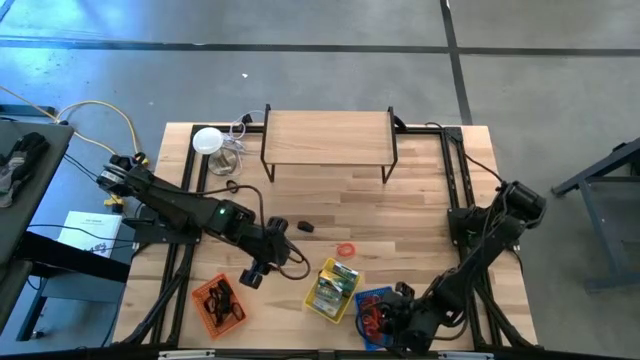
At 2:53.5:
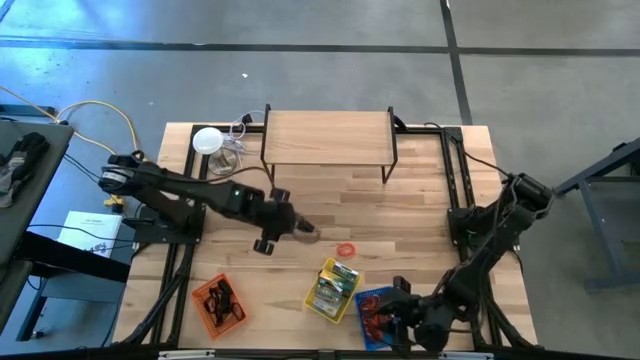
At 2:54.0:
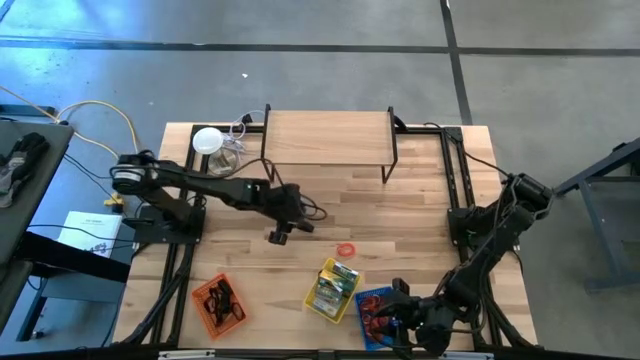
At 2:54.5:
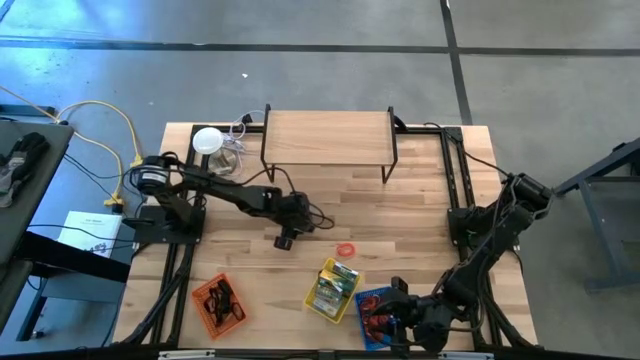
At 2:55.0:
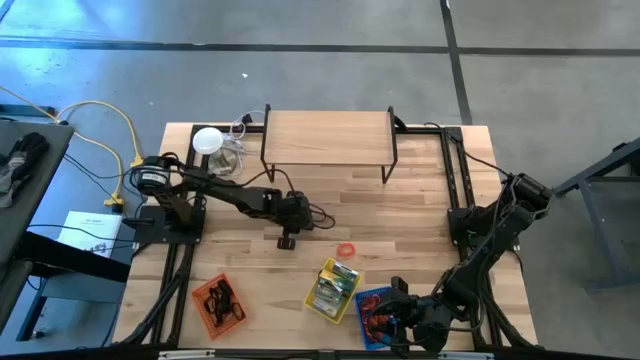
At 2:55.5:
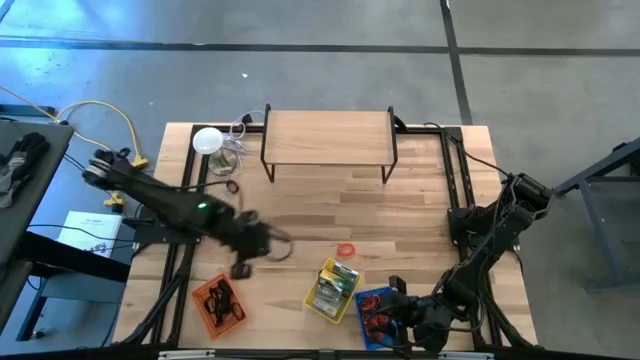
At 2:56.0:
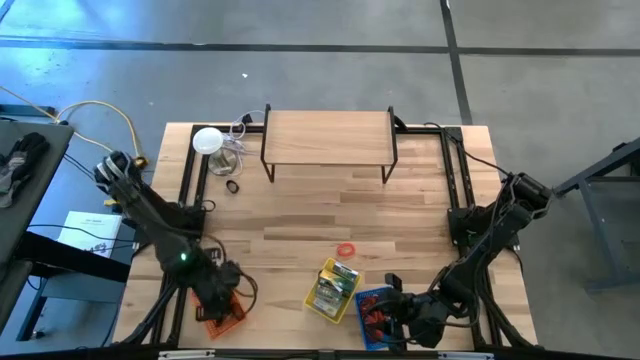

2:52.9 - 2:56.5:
Task: Pick & Place Office Desk Supplies
Put the bottom black rubber band into the orange bin

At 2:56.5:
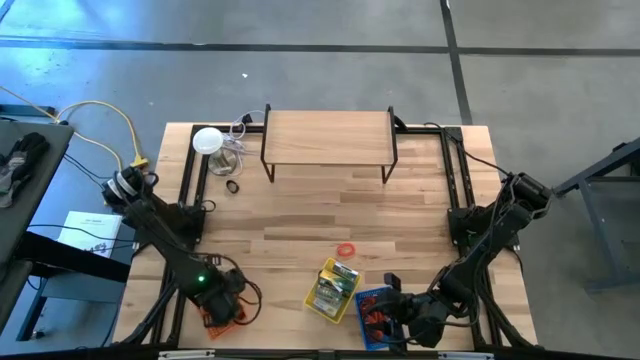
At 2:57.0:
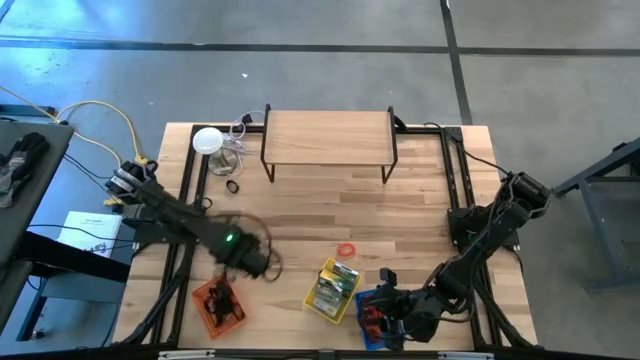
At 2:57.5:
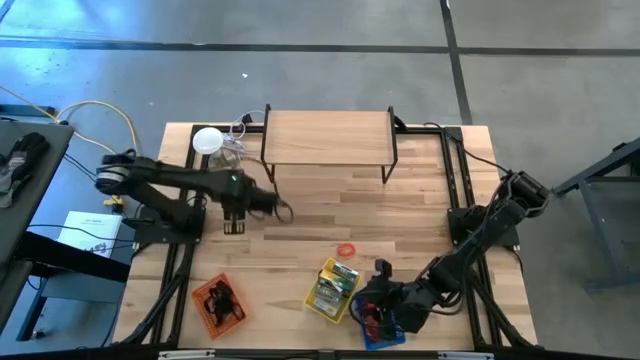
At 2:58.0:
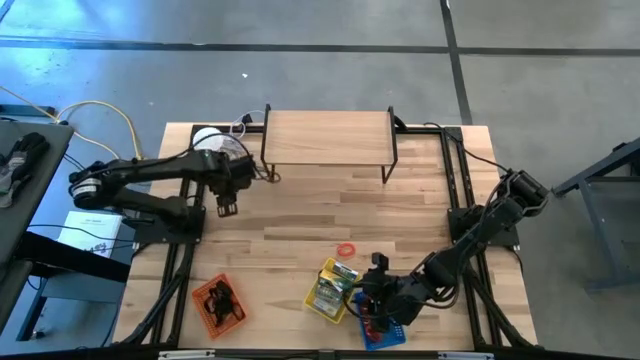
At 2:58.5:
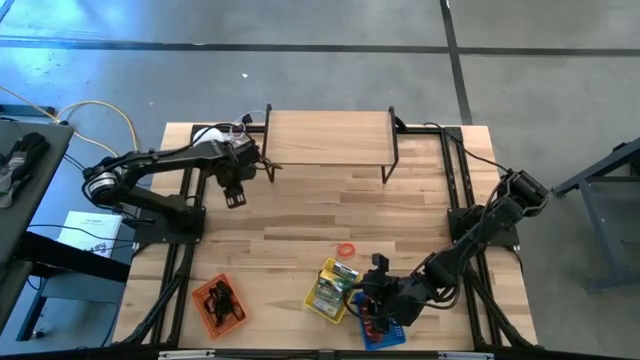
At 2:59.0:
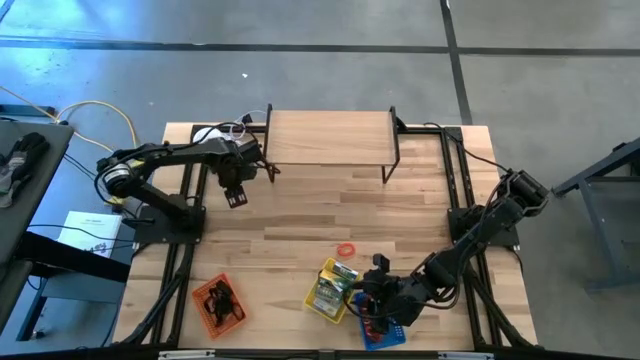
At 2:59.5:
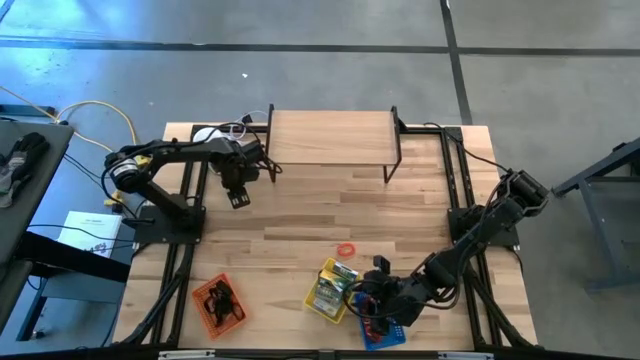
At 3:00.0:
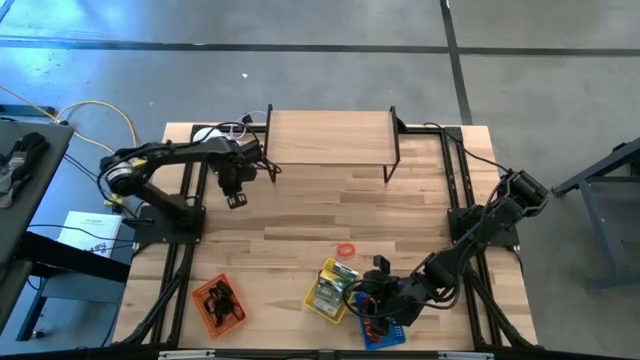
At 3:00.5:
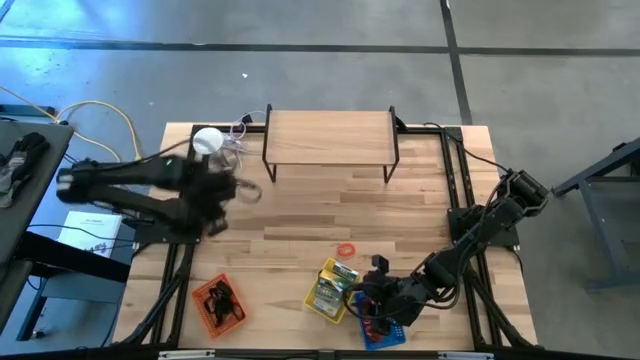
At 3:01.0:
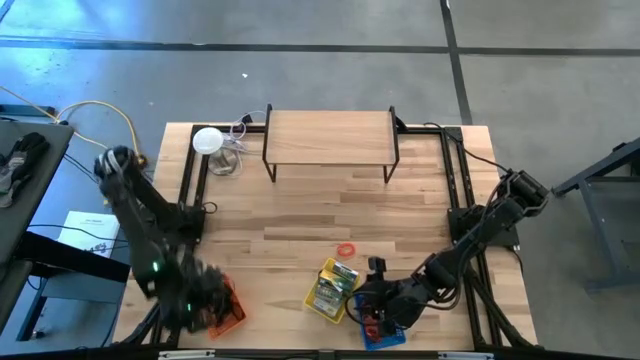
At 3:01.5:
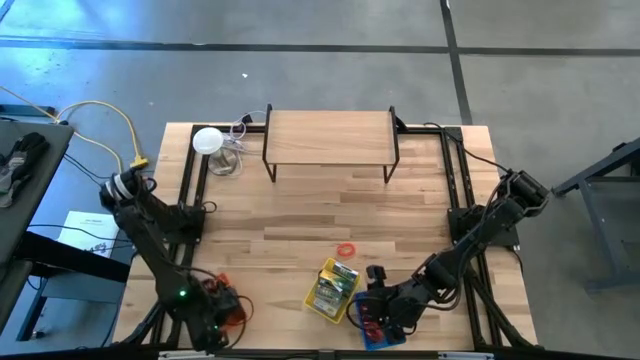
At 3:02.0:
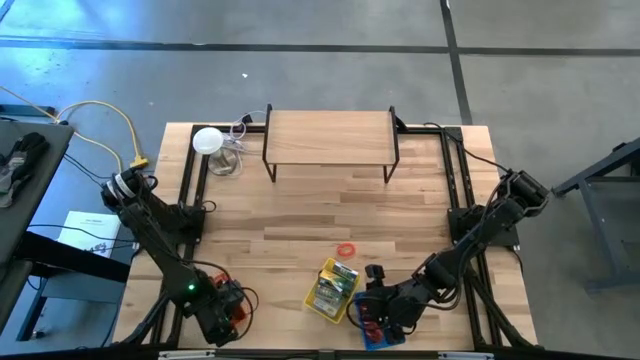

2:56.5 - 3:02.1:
Put the black rubber band into the orange bin

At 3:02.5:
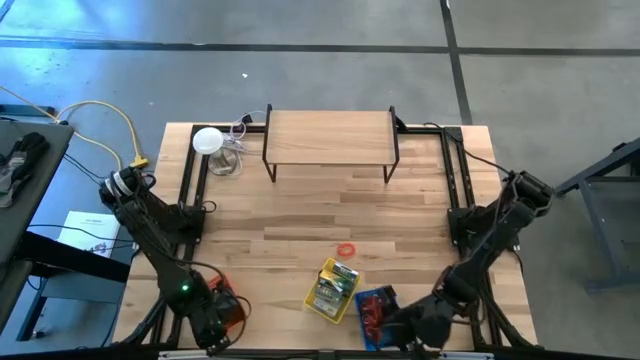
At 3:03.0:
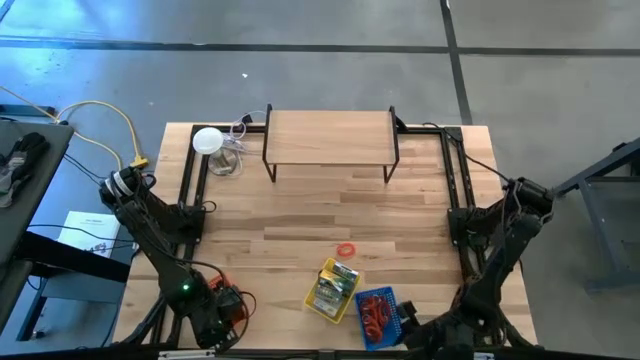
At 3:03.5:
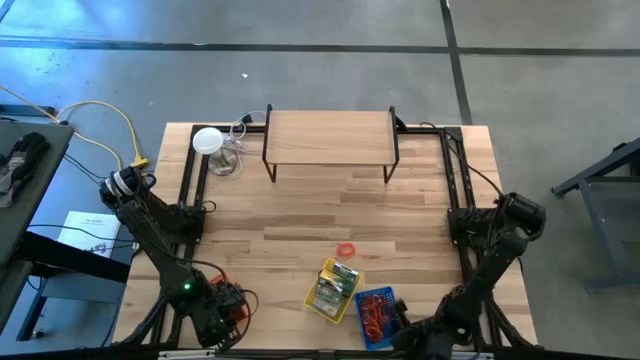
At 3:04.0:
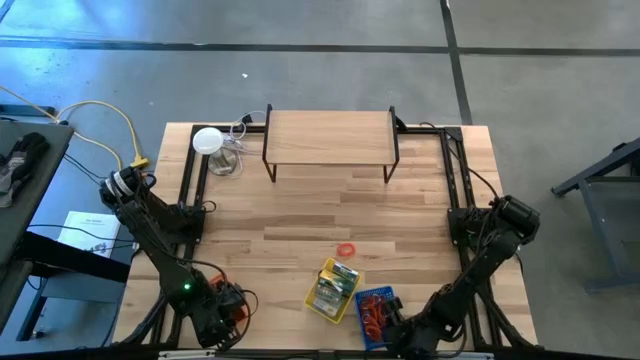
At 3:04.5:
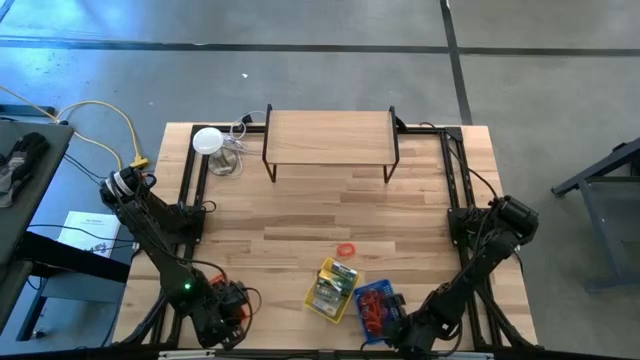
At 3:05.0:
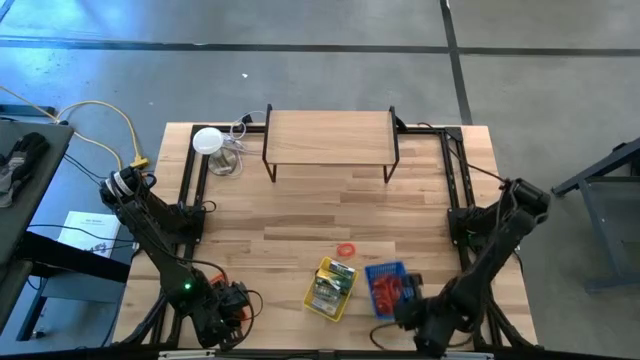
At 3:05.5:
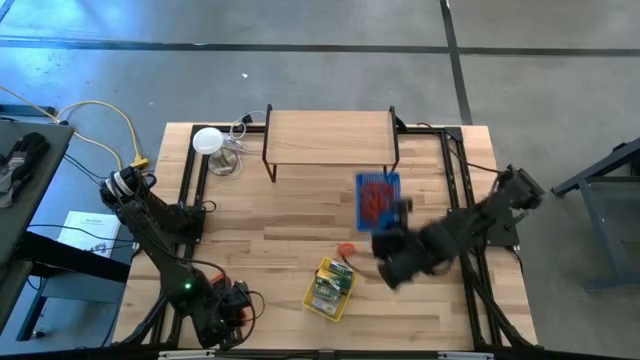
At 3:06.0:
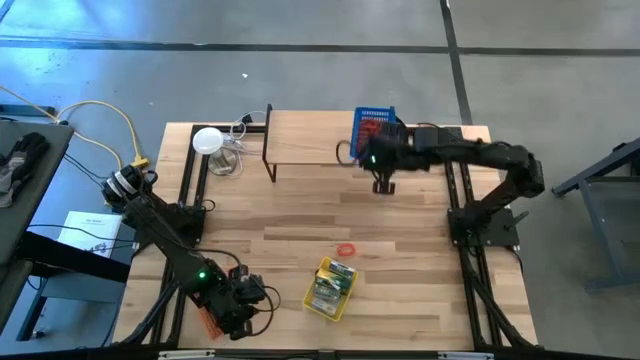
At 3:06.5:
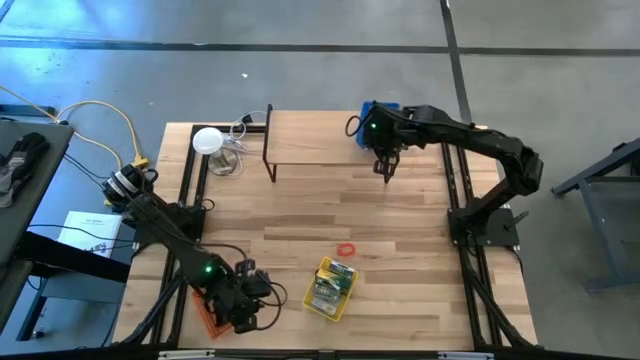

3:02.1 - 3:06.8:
Put the blue bin with the orange spring keychains on the shelf

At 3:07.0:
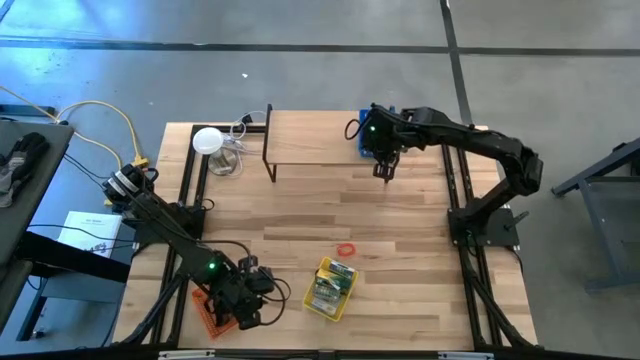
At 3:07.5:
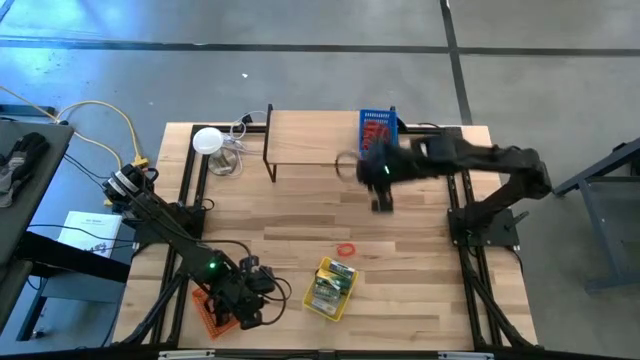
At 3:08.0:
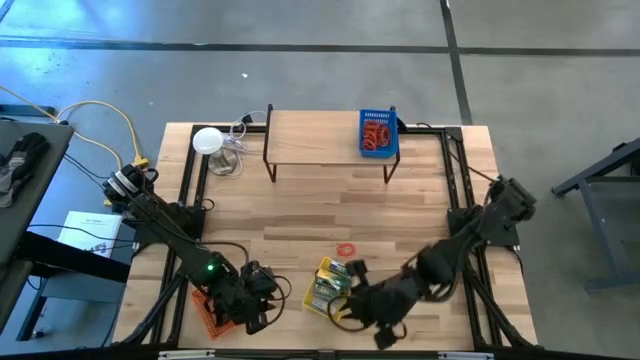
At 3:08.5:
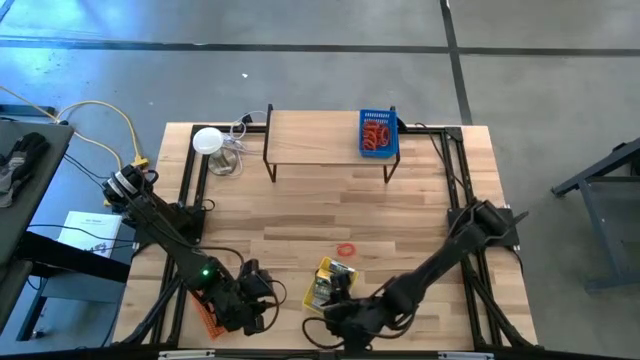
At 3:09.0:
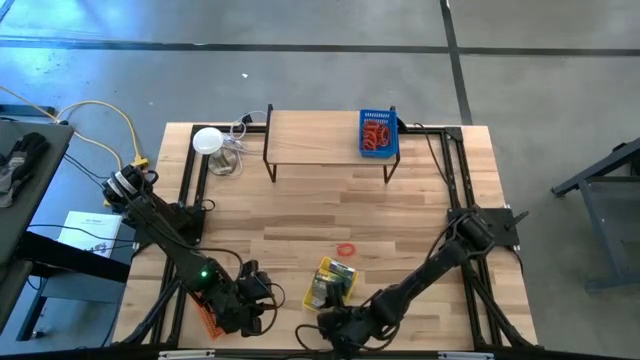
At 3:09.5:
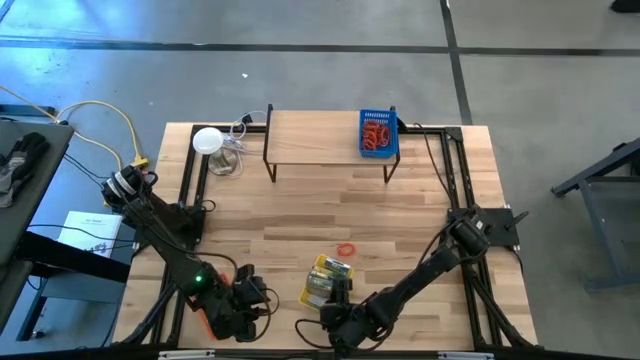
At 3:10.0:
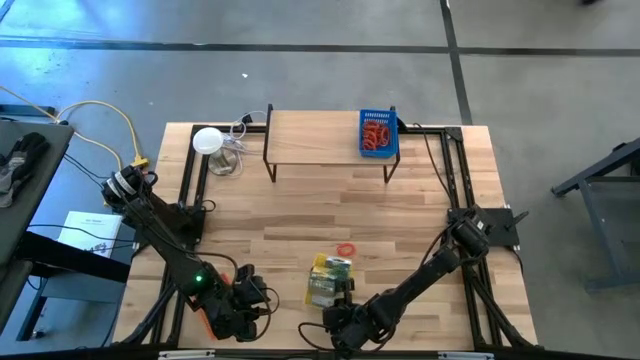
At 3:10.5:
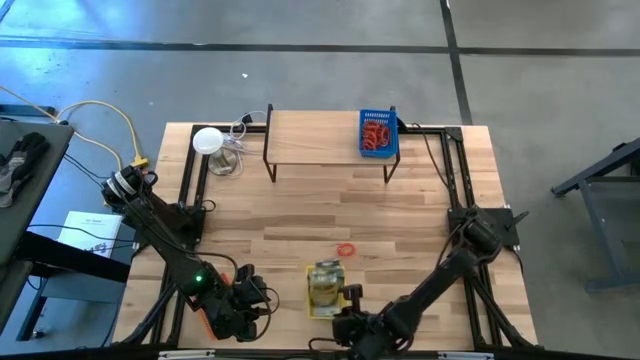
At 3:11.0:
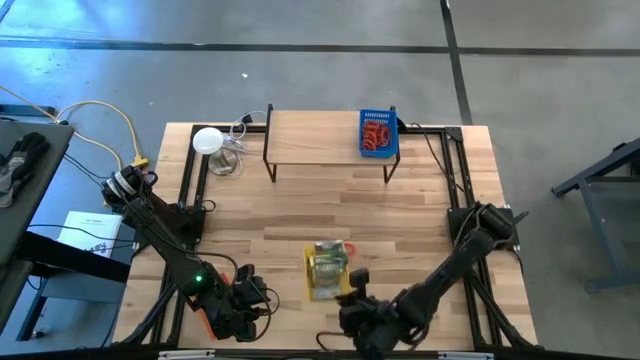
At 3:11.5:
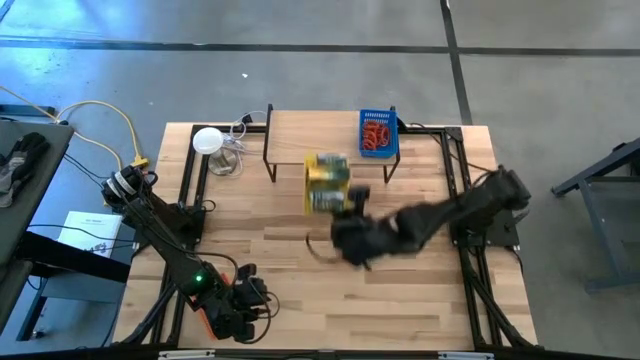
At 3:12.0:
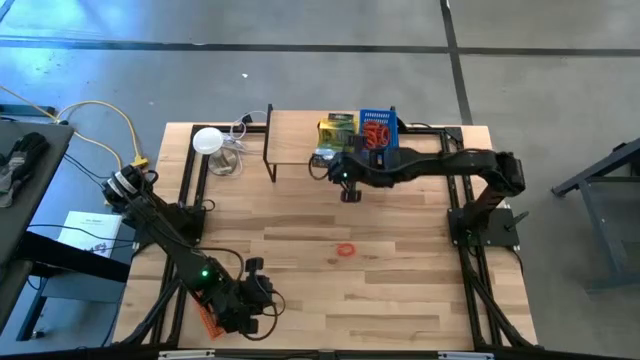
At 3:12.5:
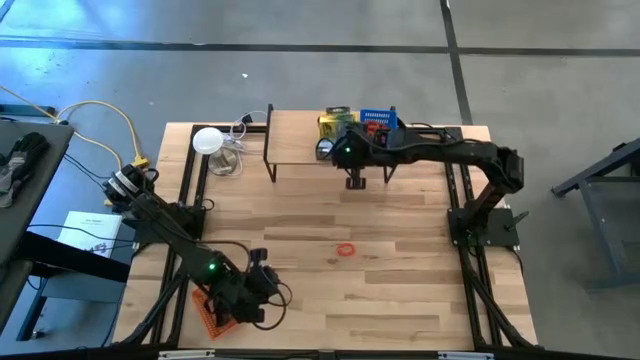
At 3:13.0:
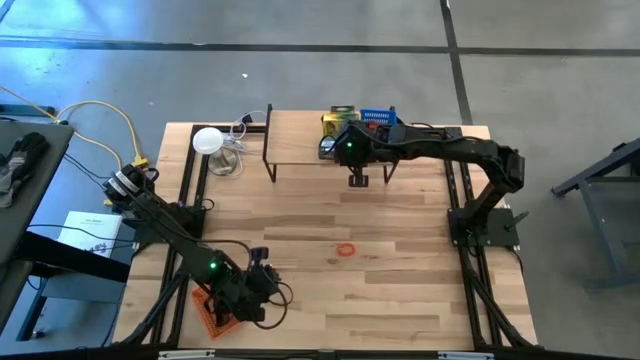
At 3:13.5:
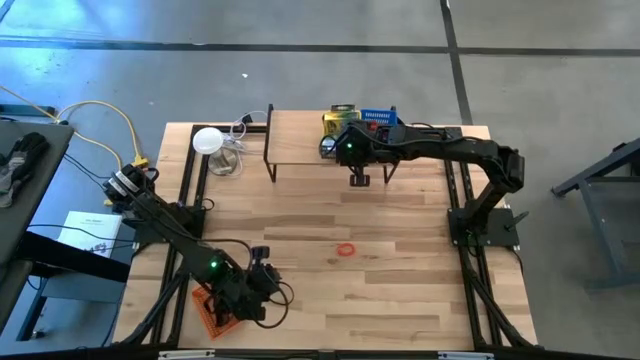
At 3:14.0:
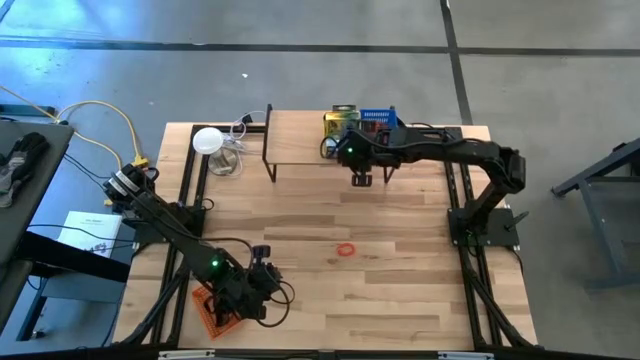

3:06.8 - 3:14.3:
Put the yellow bin with the yellow crayon boxes on the shelf
